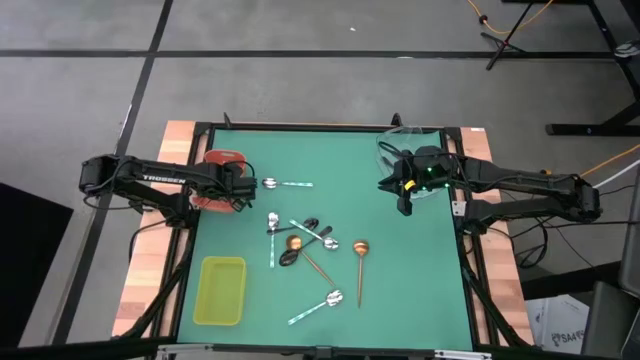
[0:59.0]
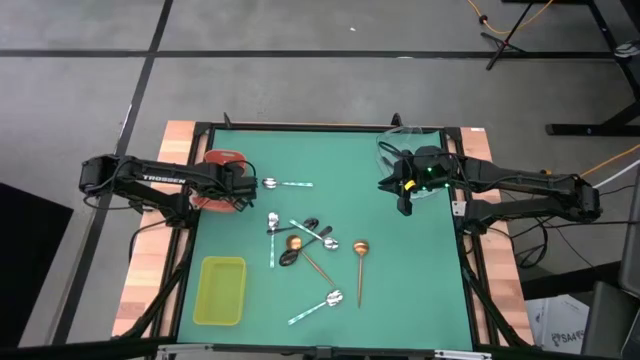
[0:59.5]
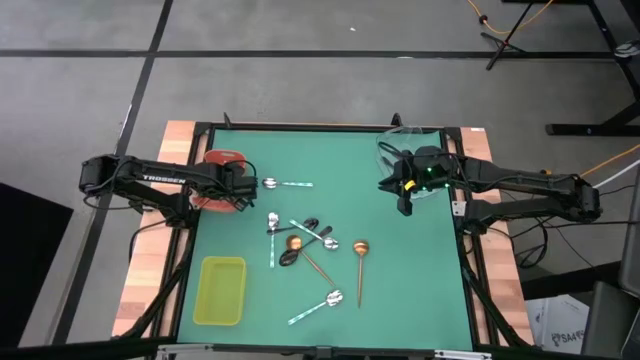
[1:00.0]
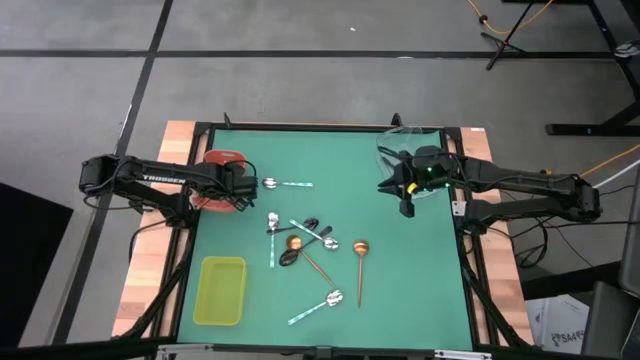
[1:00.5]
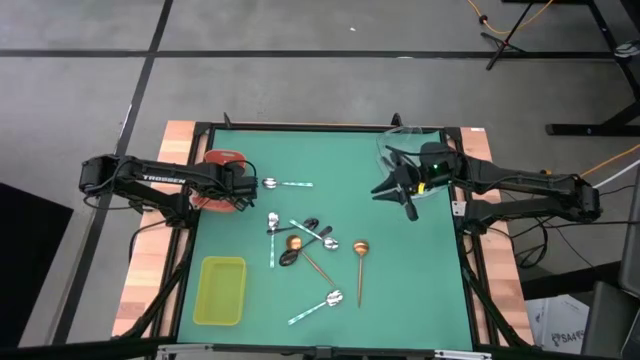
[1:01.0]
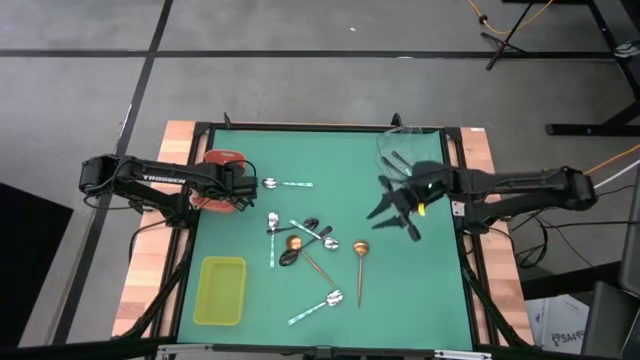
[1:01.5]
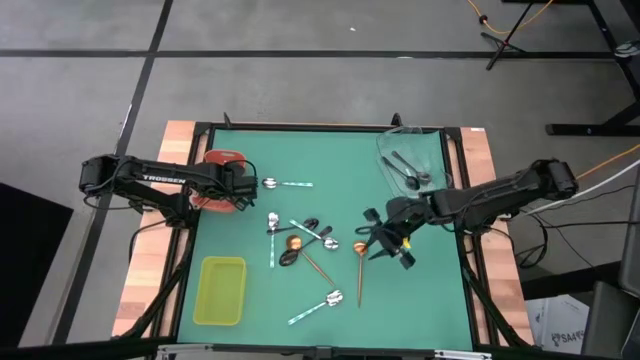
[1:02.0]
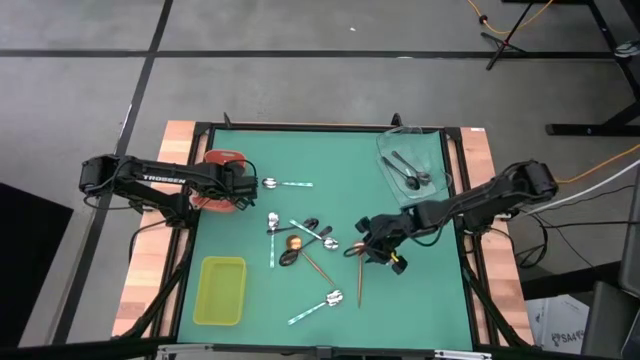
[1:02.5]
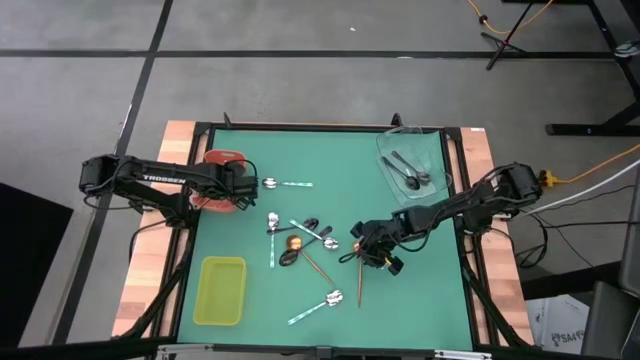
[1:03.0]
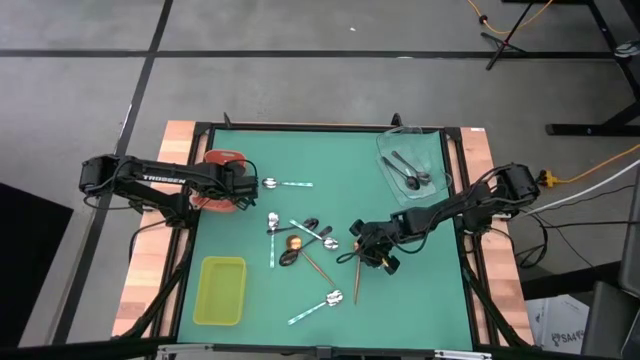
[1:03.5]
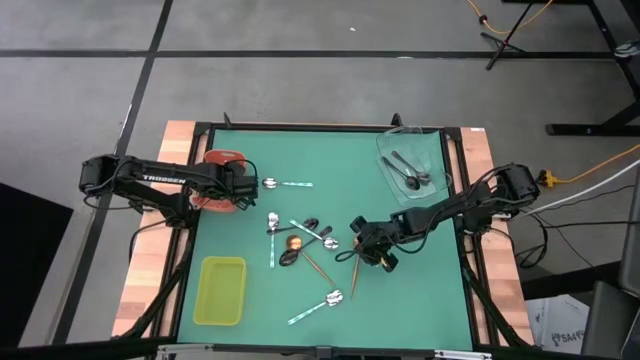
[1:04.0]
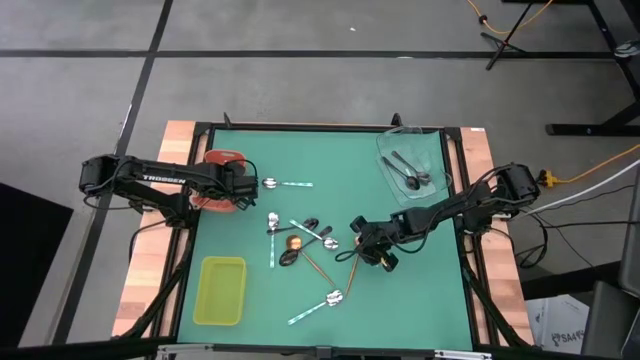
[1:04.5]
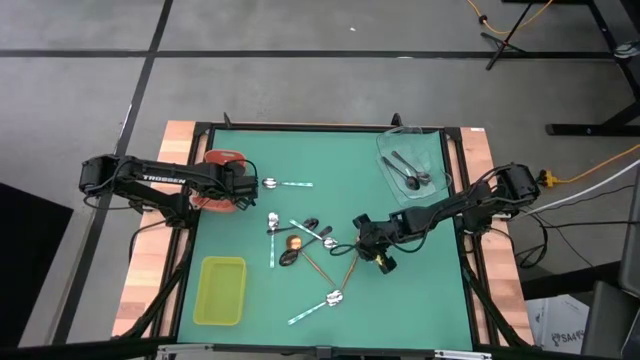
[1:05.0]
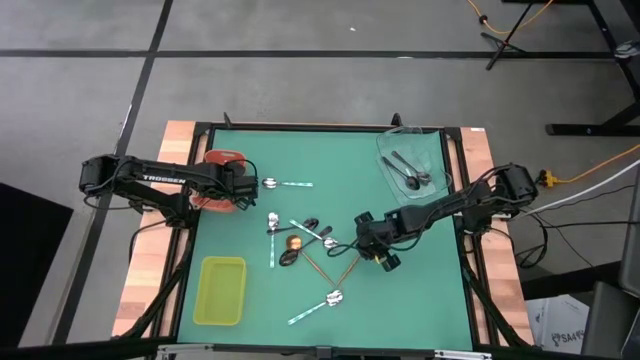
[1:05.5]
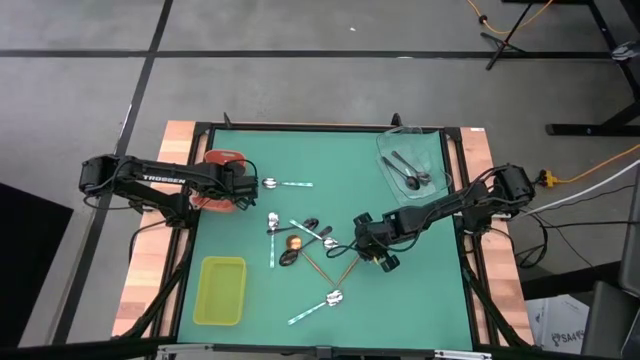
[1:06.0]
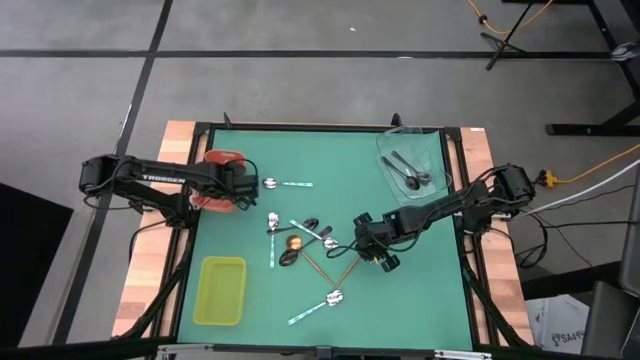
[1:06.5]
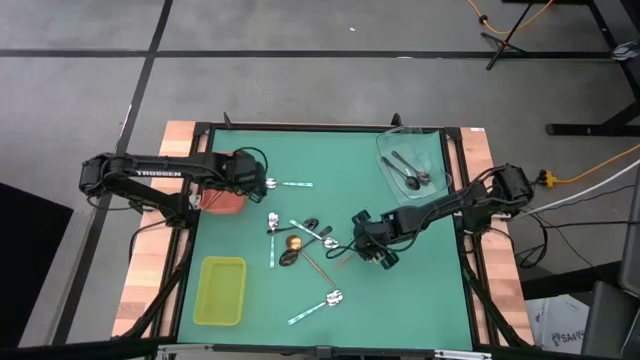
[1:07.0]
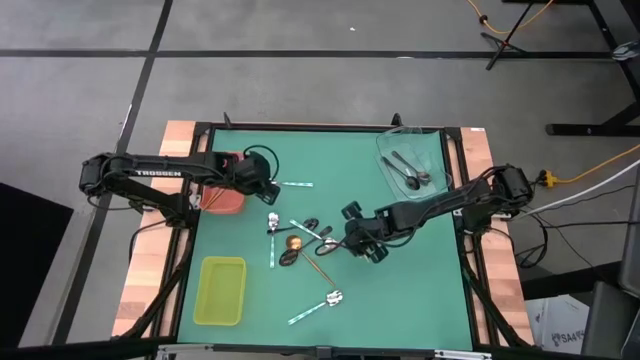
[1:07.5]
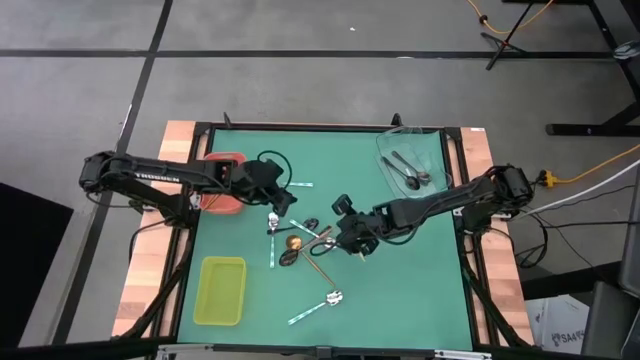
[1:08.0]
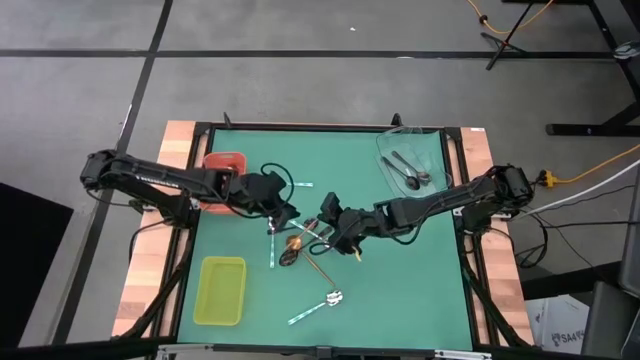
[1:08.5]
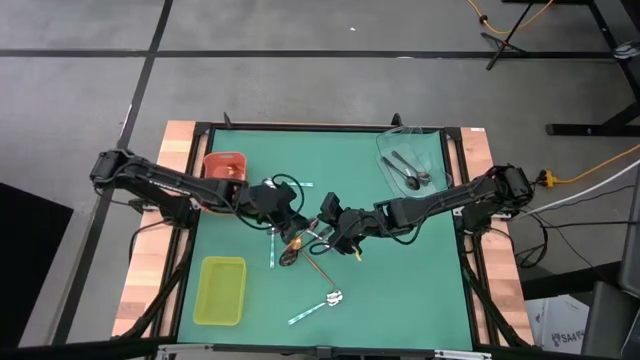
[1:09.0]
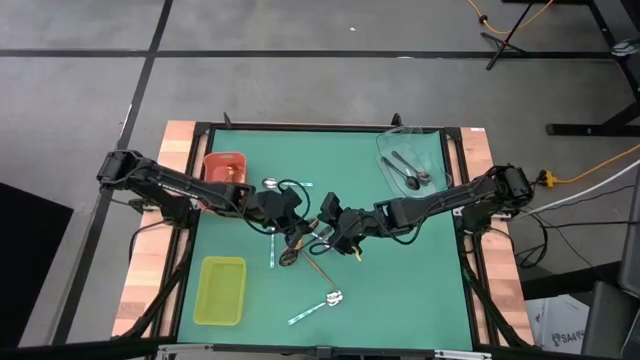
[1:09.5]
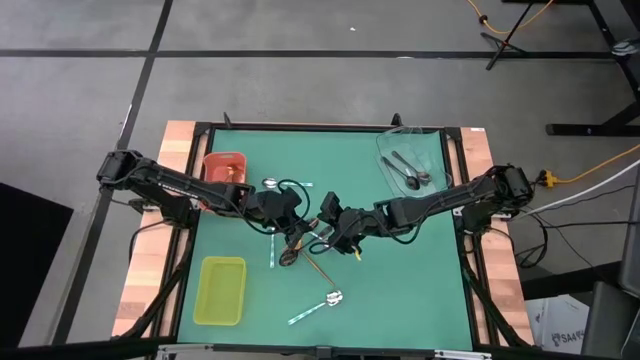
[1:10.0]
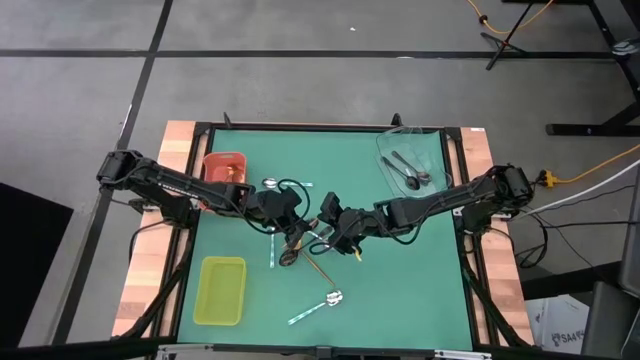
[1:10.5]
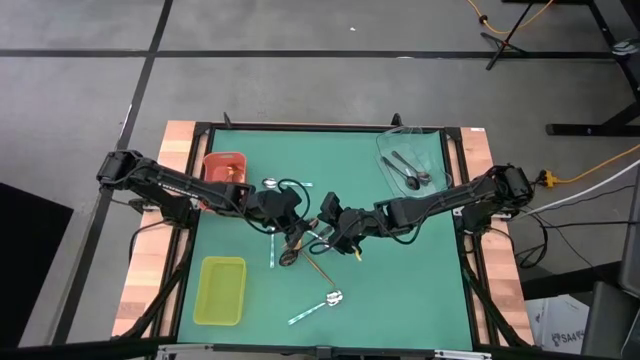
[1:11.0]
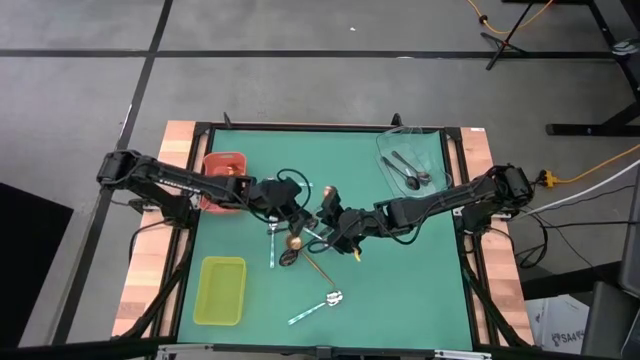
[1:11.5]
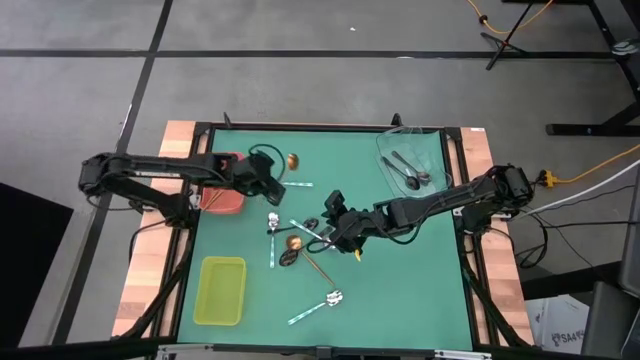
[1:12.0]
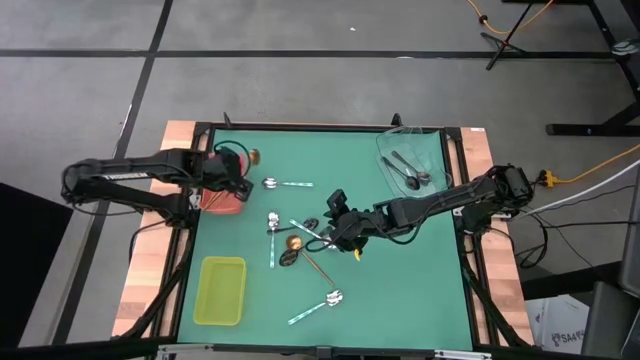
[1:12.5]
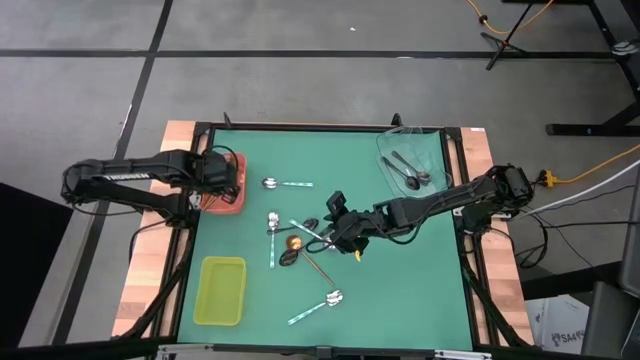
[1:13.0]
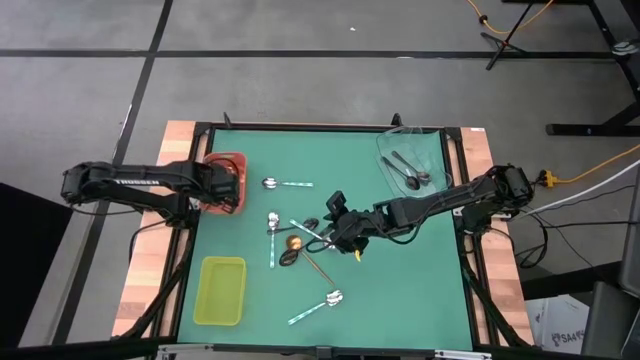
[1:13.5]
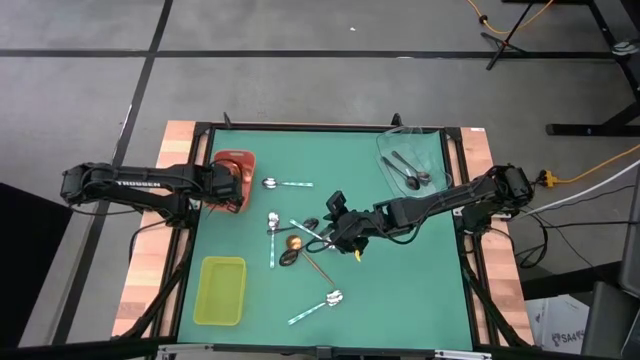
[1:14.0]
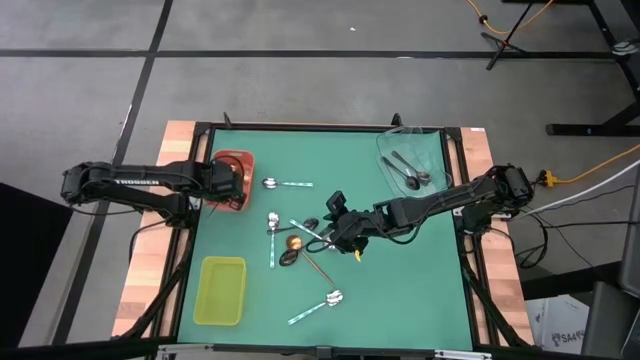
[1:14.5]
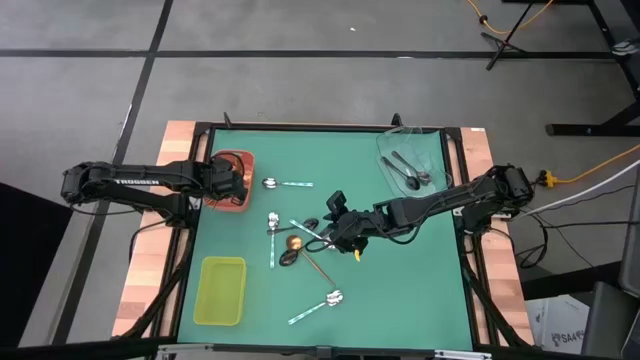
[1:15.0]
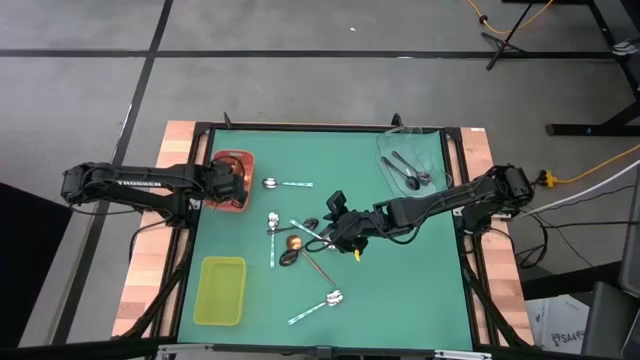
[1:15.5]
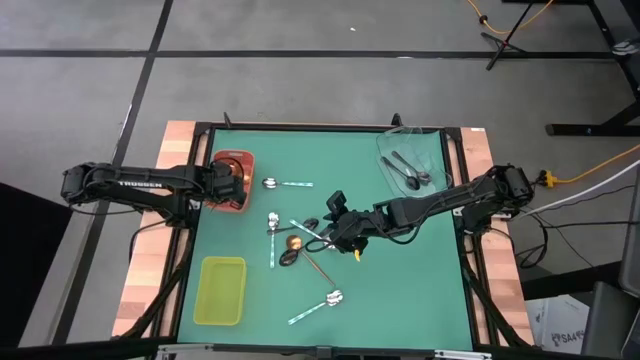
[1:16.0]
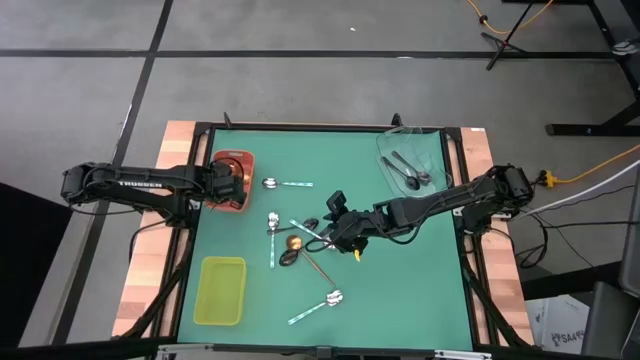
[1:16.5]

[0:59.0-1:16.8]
Task: Sort silverware by color (type)
Put the gold spoon into the orange bin

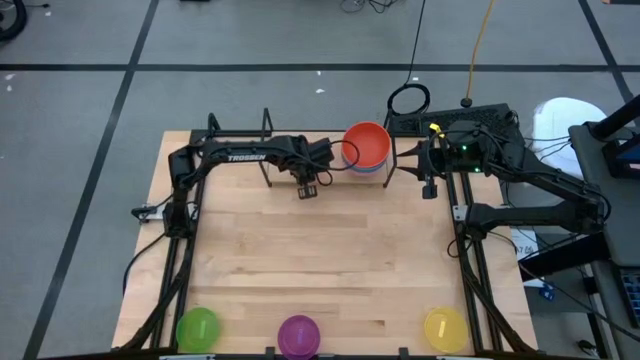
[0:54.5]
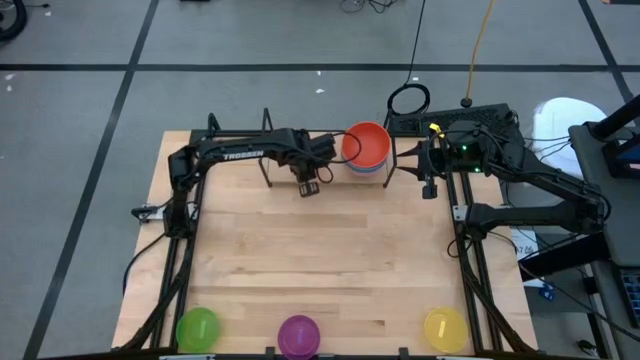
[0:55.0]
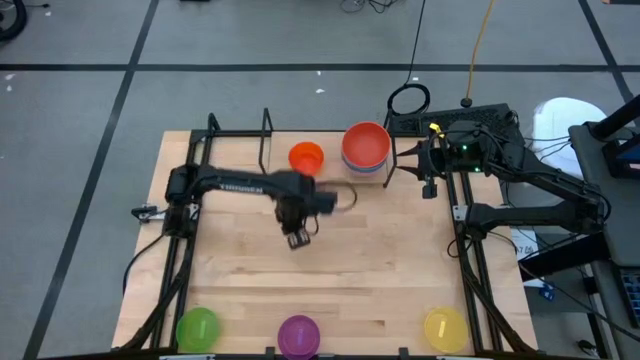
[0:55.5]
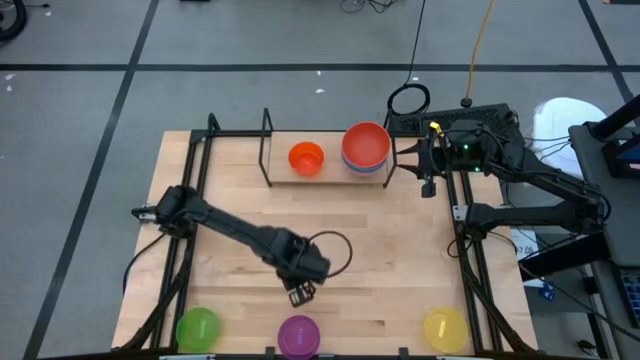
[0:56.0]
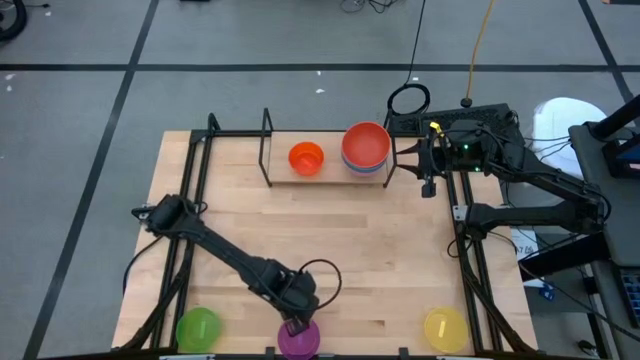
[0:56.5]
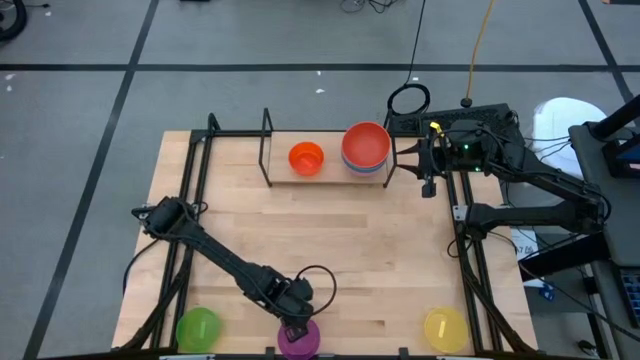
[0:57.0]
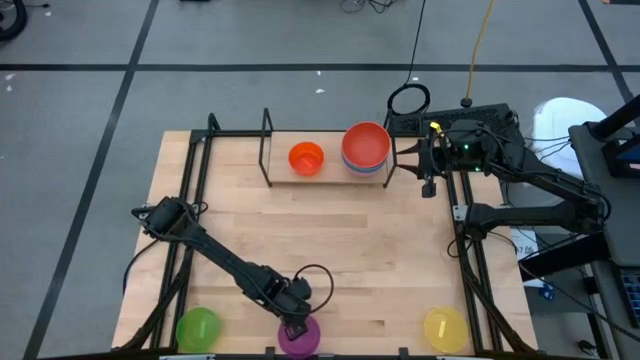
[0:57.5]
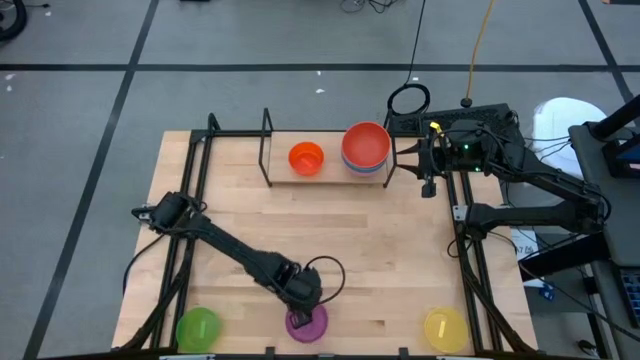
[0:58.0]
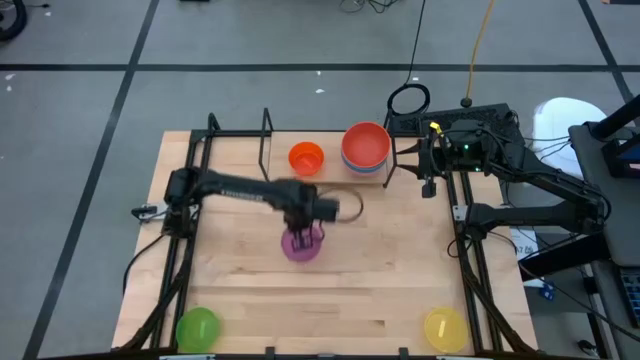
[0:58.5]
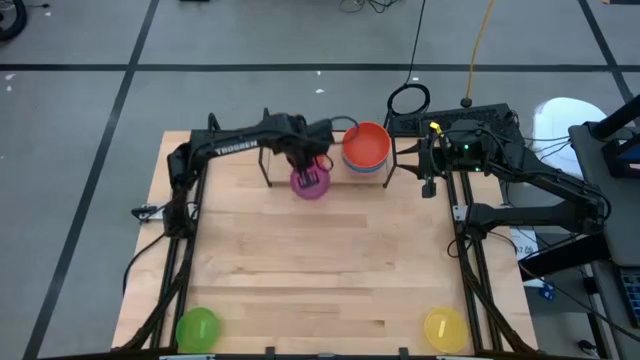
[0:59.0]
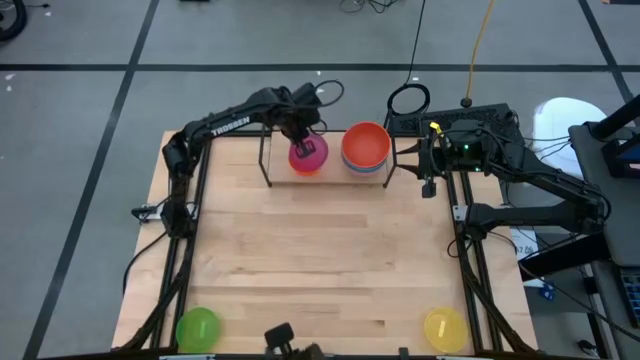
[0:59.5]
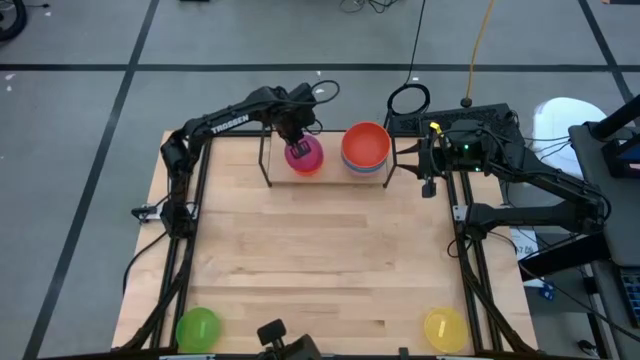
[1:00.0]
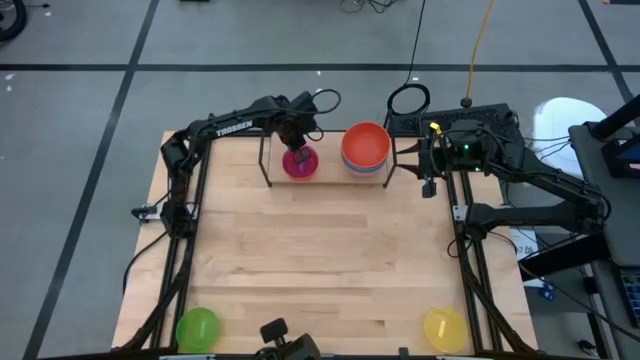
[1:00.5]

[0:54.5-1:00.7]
Task: Place and stack bowls onto a shelf
Stack the purple bowl onto the small orange bowl on the shelf
